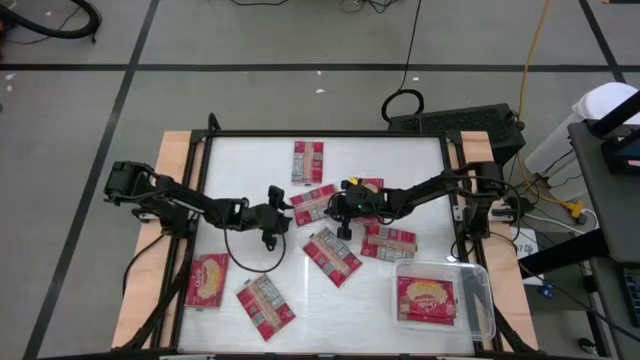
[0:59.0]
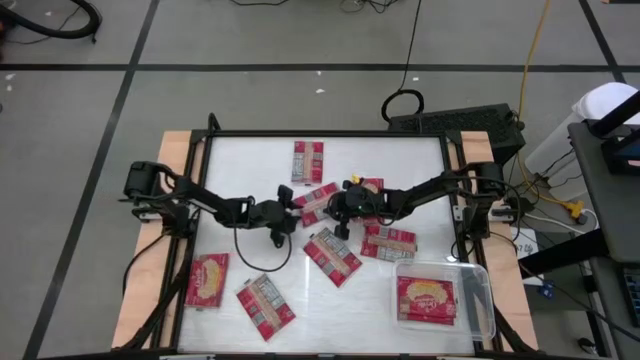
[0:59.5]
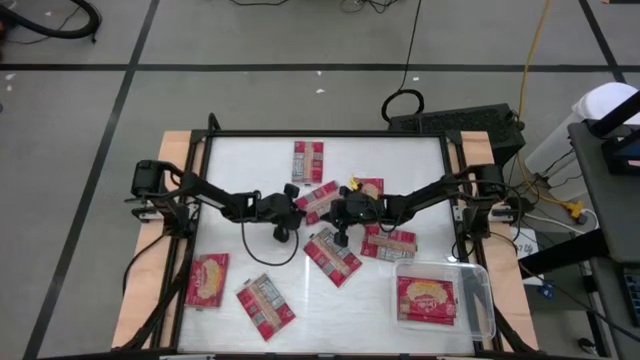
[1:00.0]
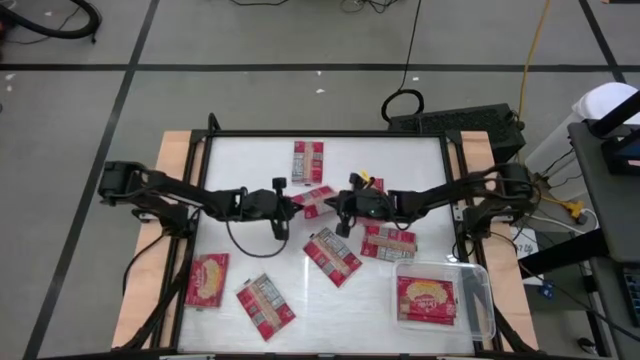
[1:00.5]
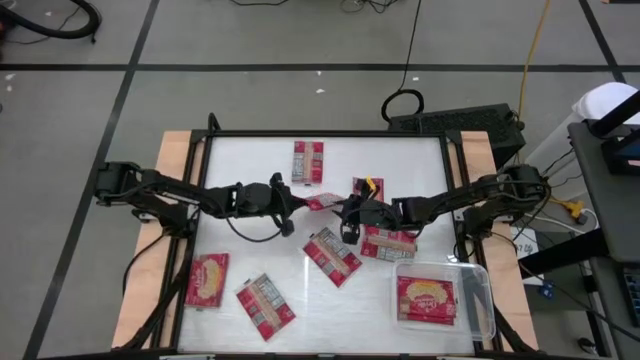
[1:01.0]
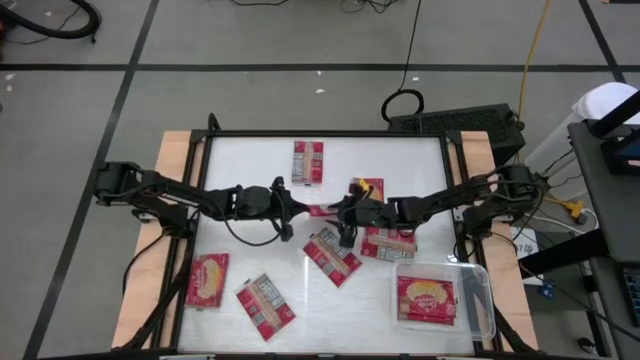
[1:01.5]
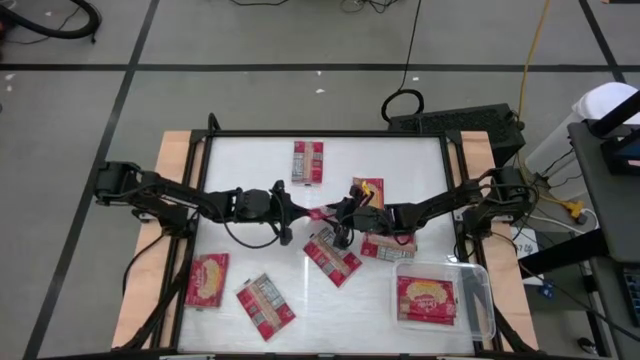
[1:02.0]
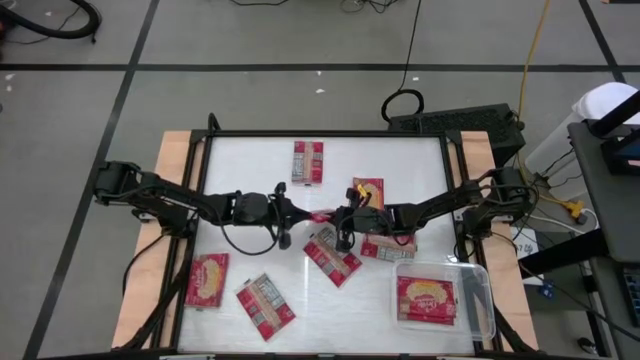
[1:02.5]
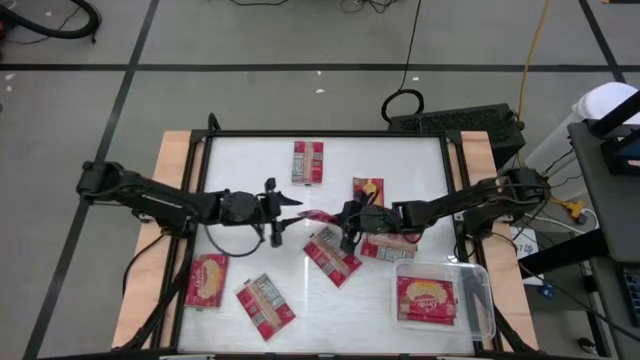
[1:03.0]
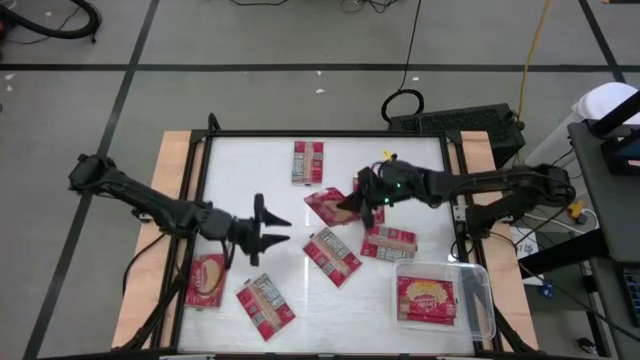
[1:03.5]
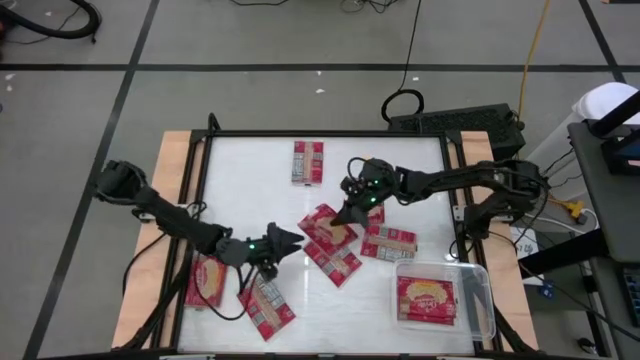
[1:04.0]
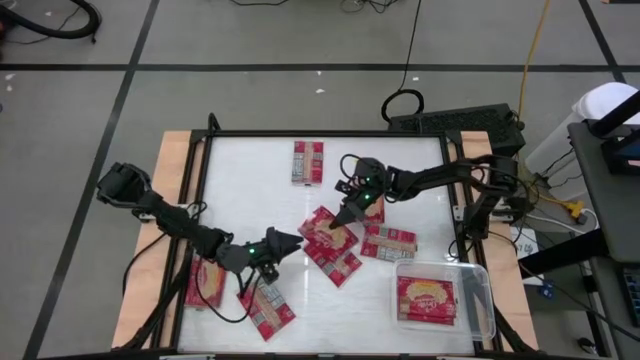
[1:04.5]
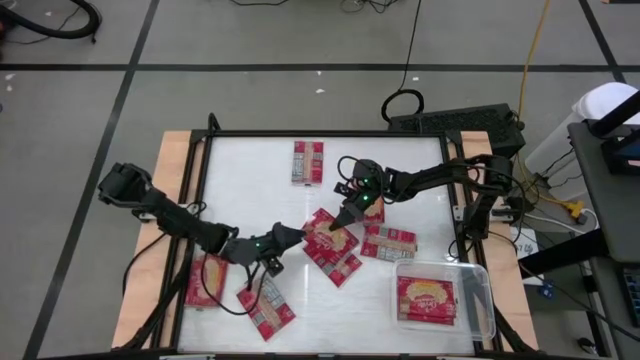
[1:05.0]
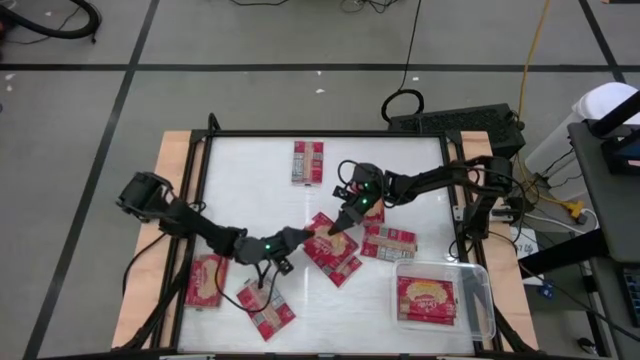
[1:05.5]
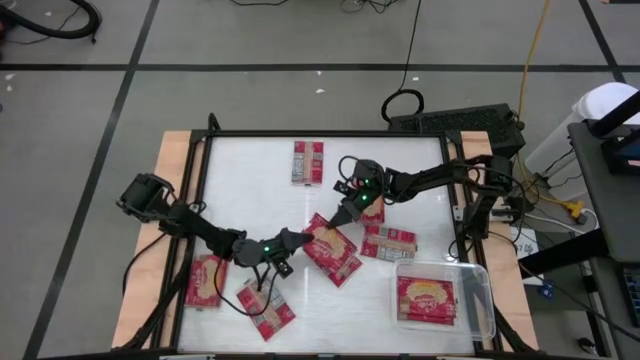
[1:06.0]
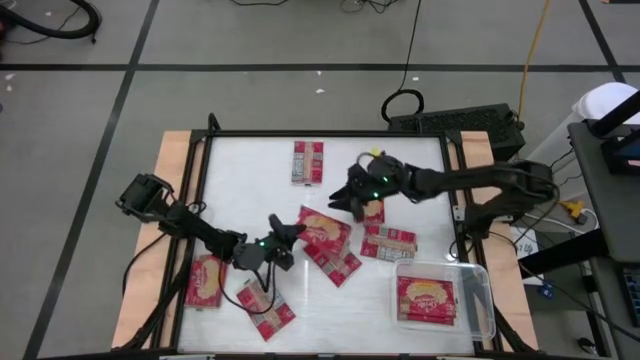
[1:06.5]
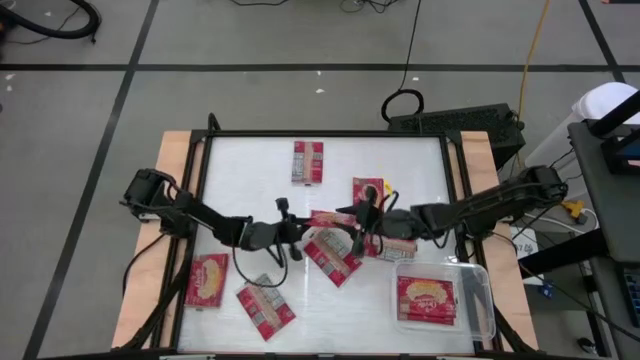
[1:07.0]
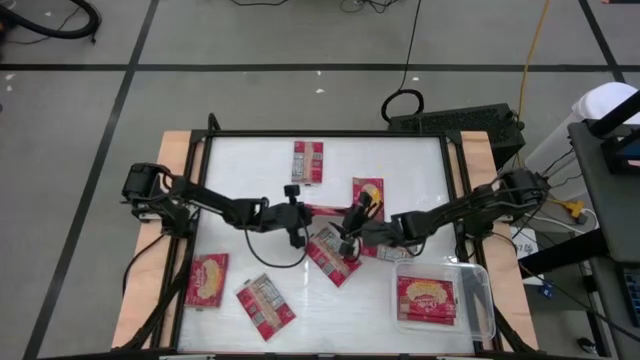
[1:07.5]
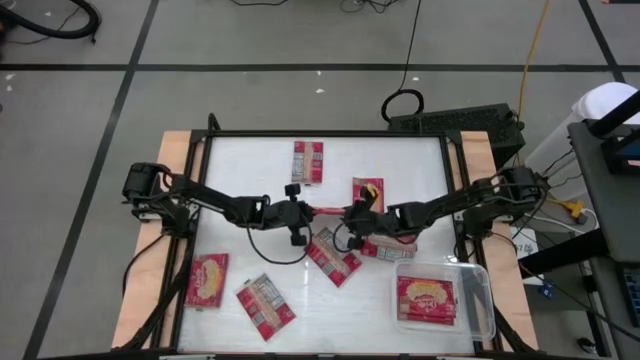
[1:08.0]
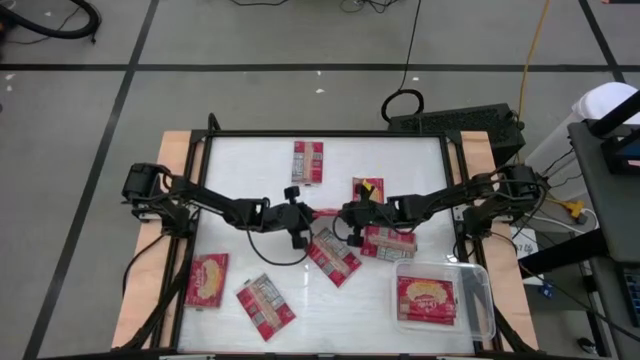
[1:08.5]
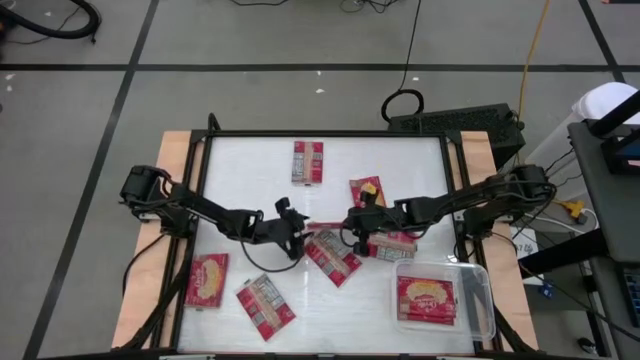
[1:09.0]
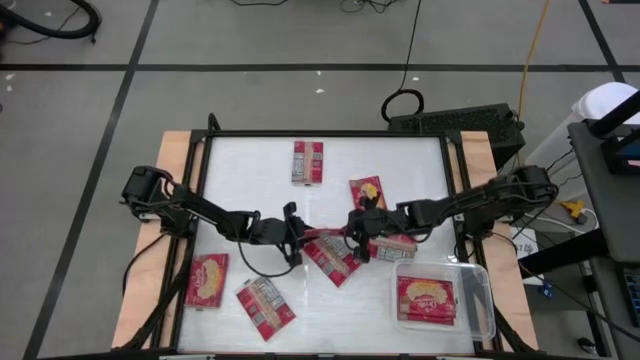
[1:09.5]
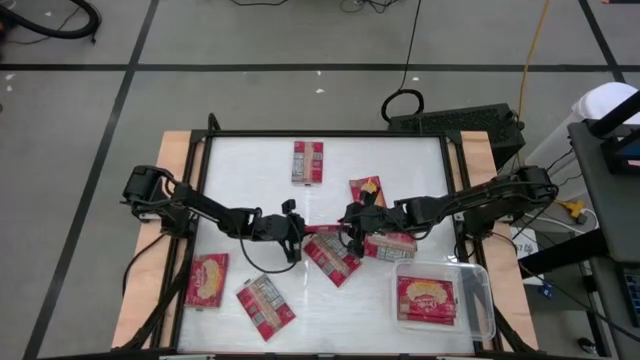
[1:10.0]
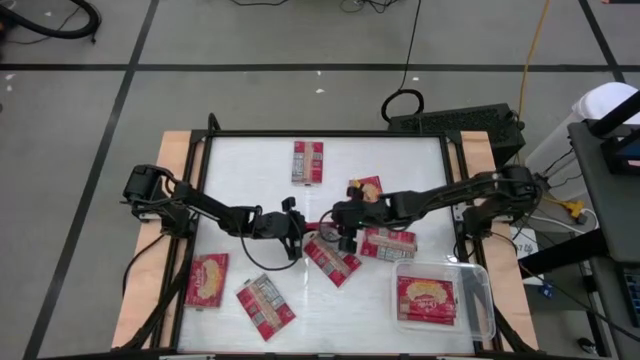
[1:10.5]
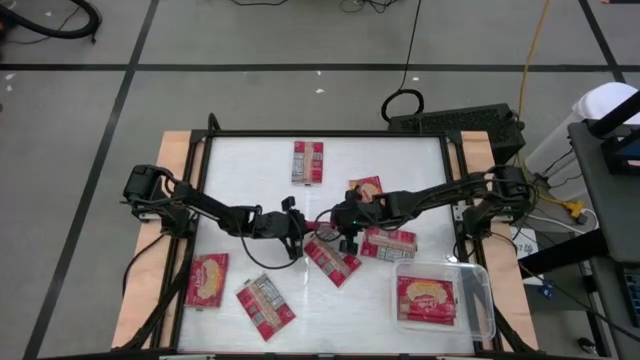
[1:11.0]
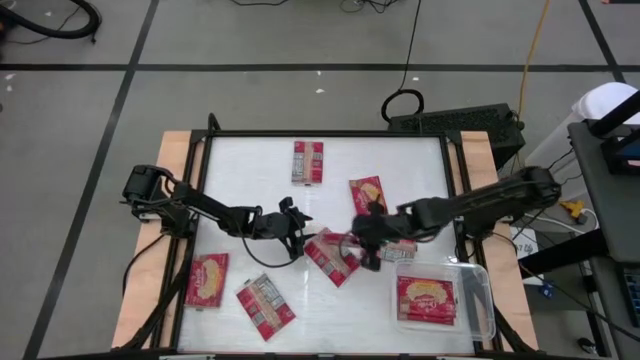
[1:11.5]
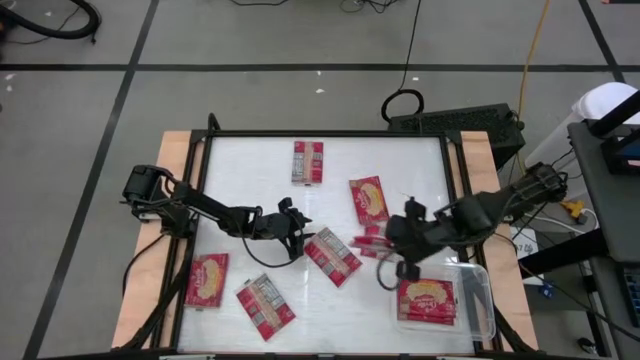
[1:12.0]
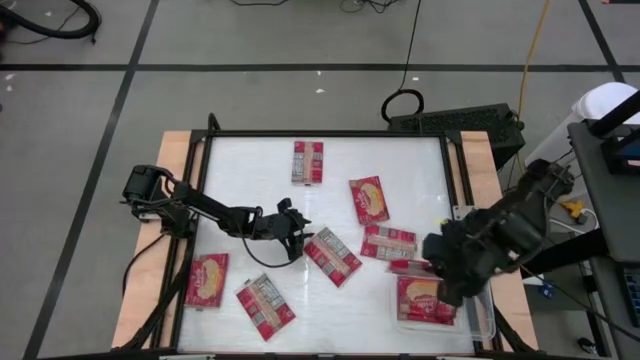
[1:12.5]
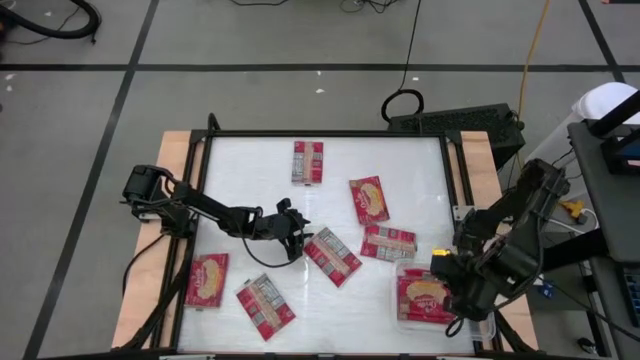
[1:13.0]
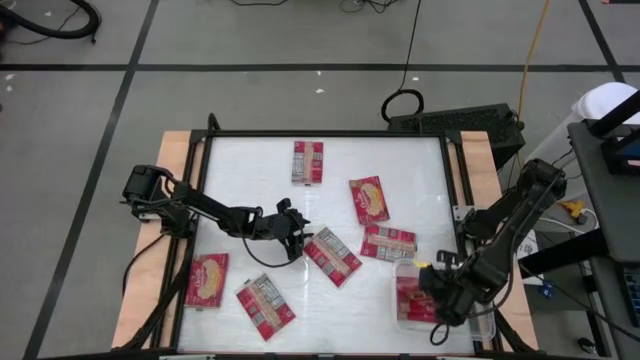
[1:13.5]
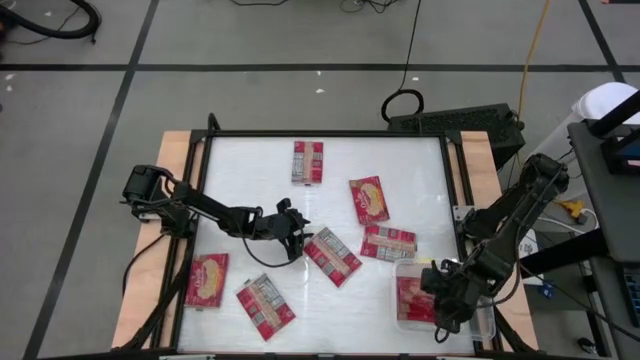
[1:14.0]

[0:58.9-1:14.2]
Task: Sort popcorn bags into baskets
Put the red popcorn pack into the transparent bin

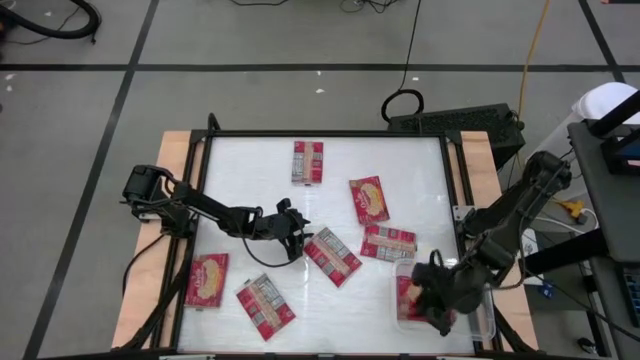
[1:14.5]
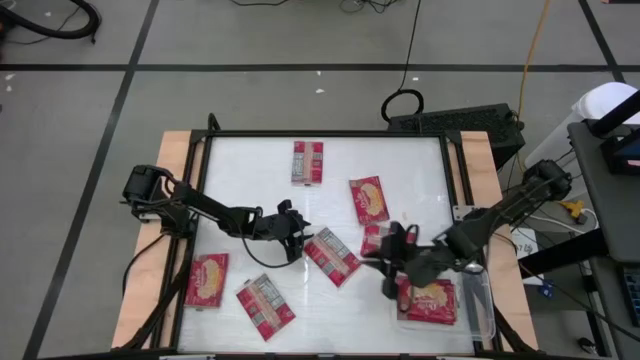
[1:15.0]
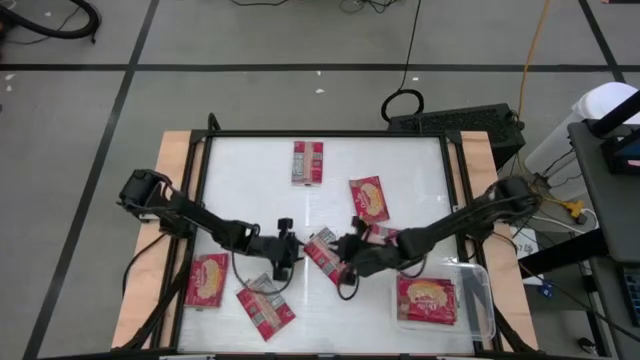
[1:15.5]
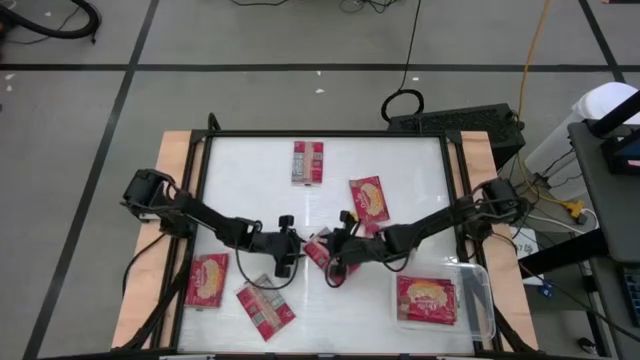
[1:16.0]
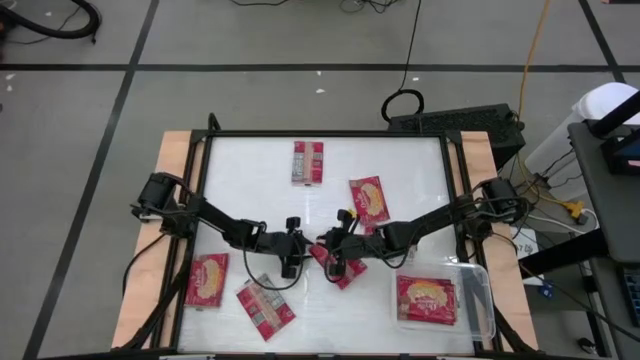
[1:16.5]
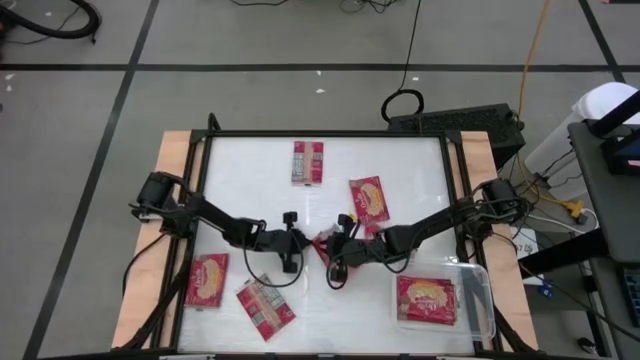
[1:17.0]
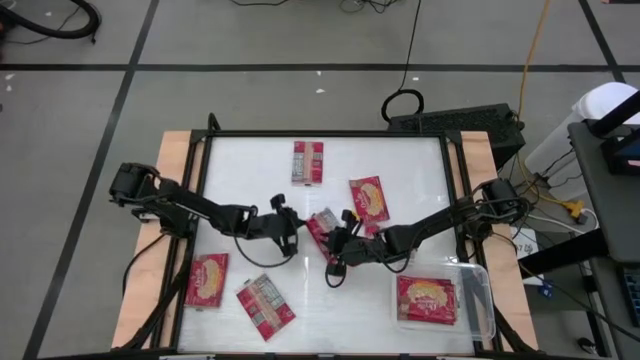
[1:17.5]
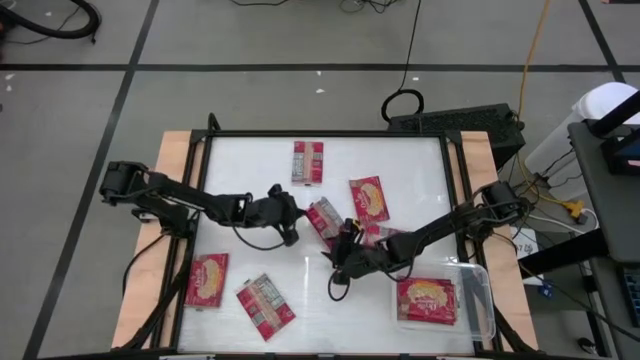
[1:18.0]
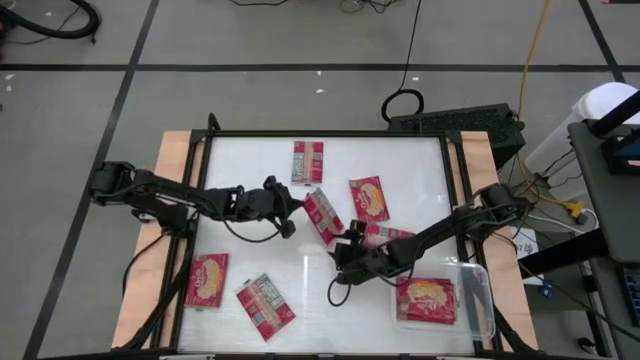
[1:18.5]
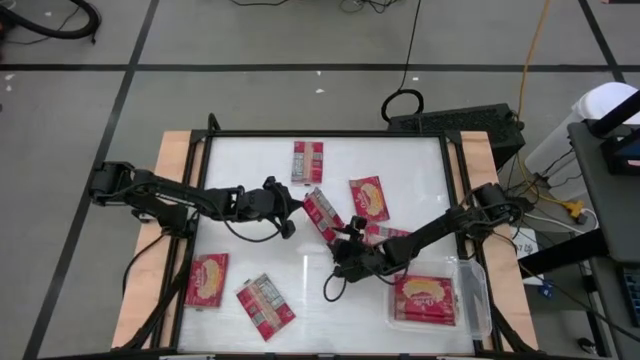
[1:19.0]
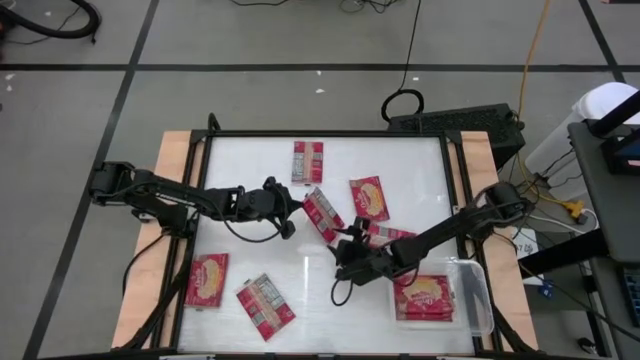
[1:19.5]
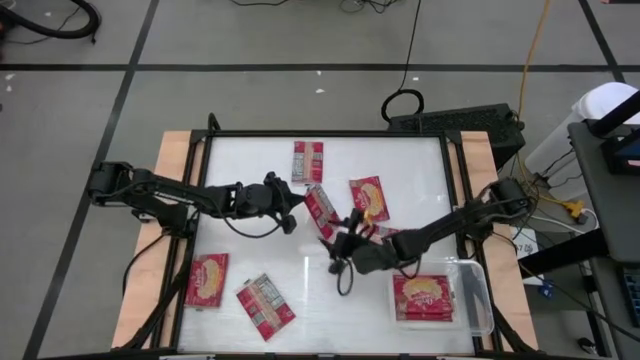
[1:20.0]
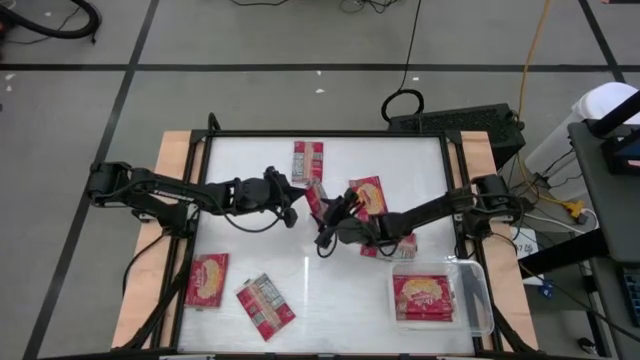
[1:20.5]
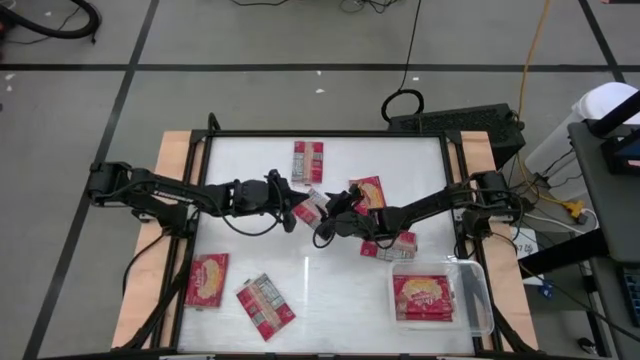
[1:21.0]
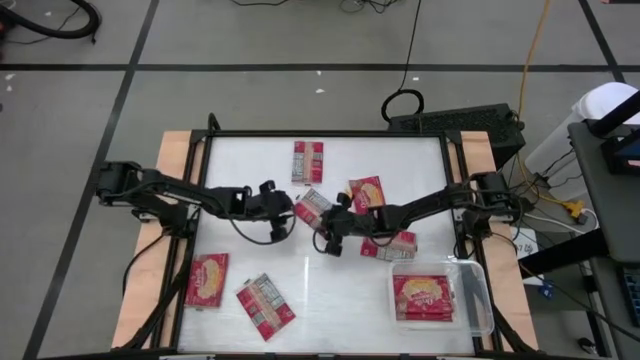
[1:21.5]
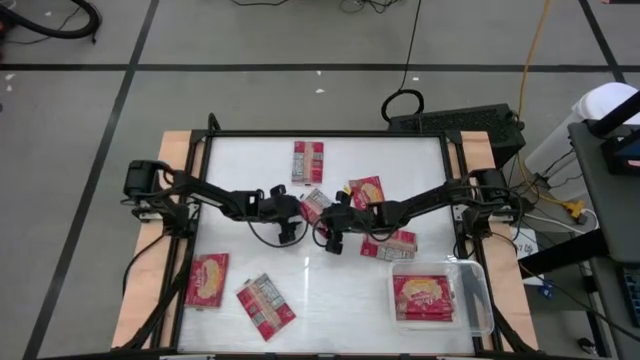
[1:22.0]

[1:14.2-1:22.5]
Put the red popcorn pack into the transparent bin
